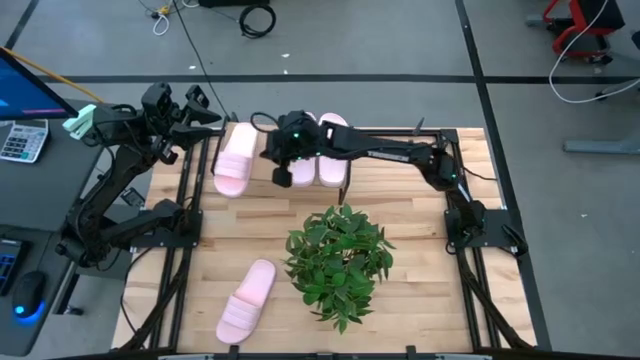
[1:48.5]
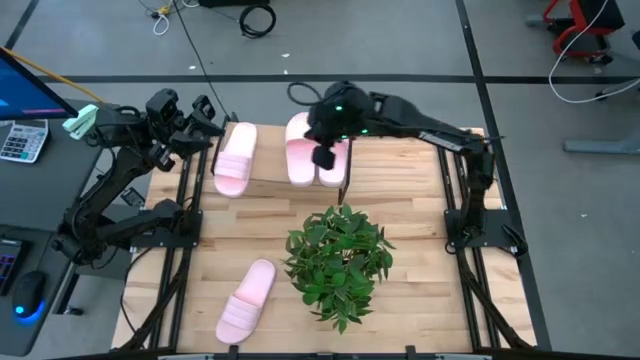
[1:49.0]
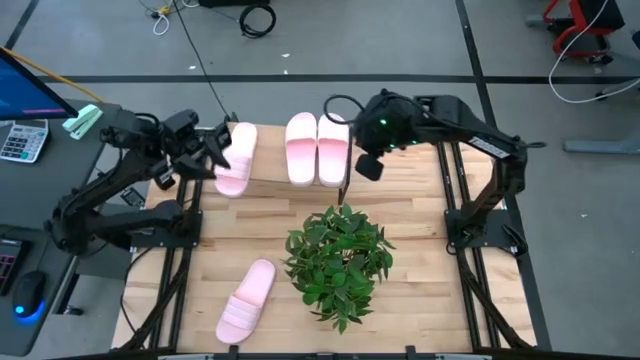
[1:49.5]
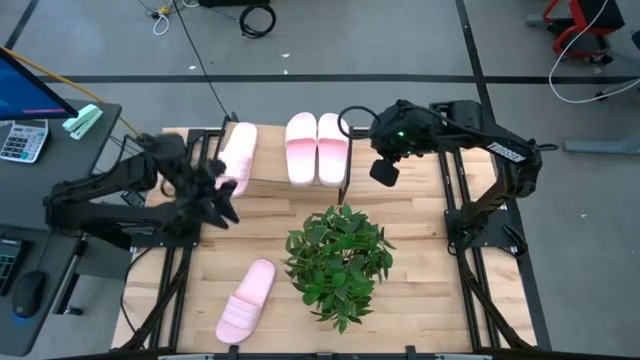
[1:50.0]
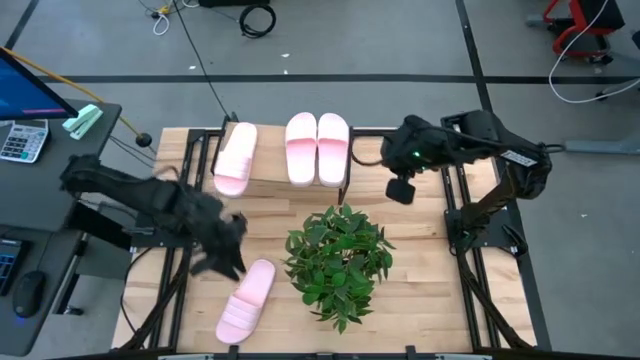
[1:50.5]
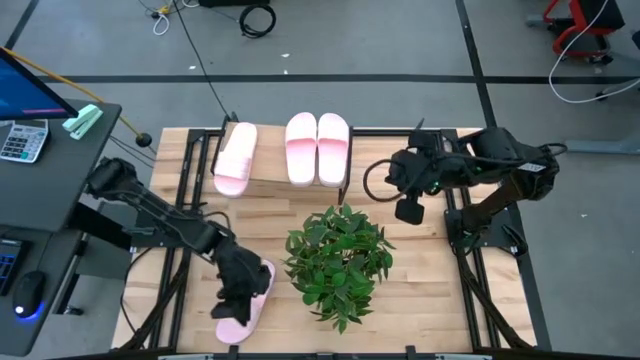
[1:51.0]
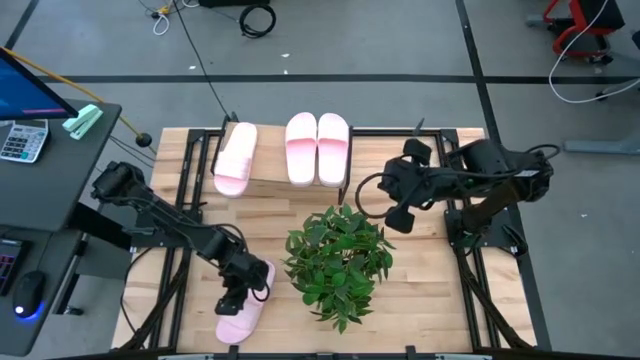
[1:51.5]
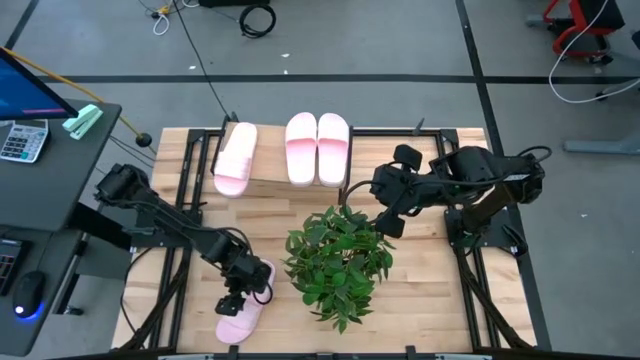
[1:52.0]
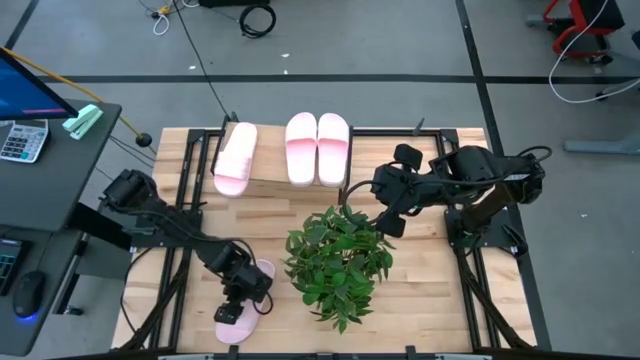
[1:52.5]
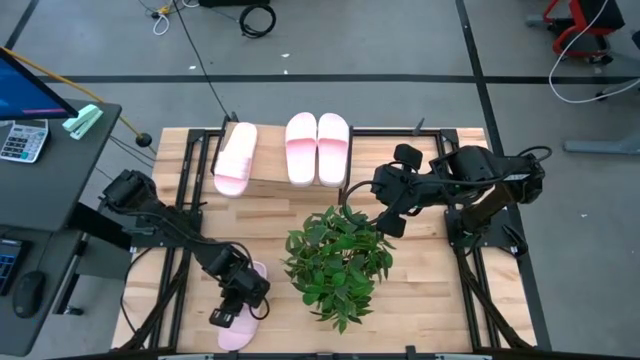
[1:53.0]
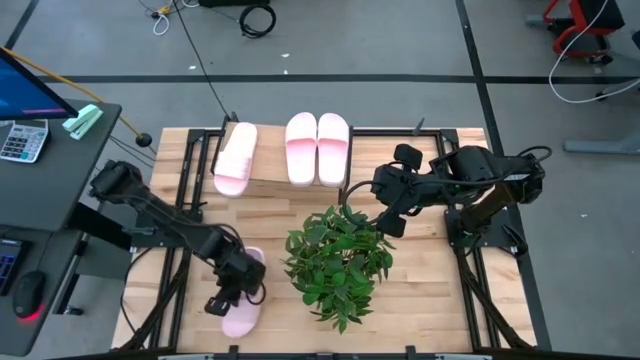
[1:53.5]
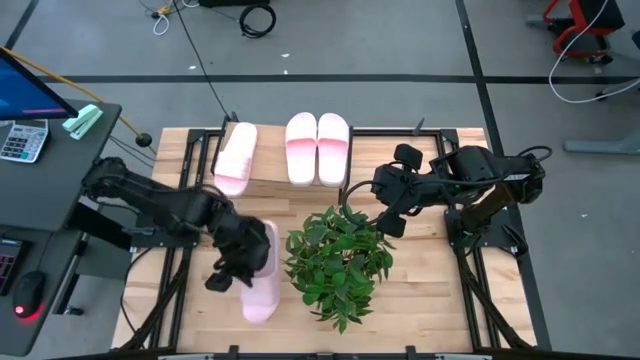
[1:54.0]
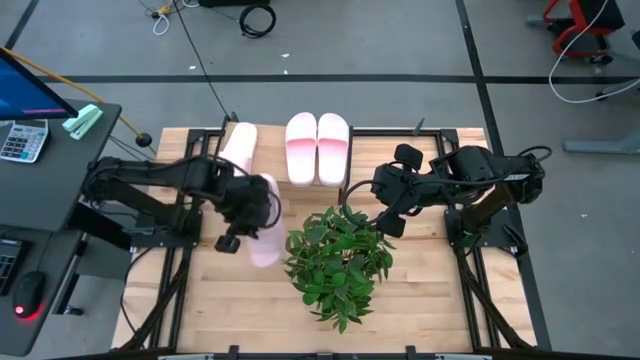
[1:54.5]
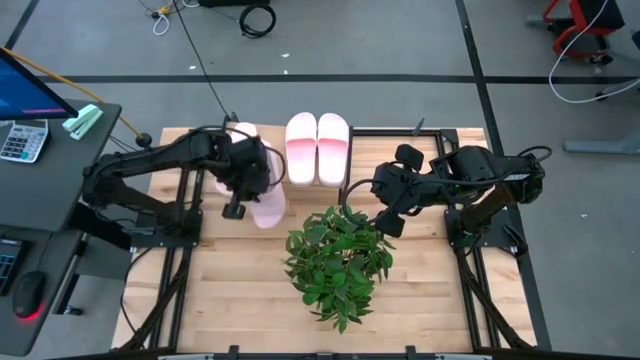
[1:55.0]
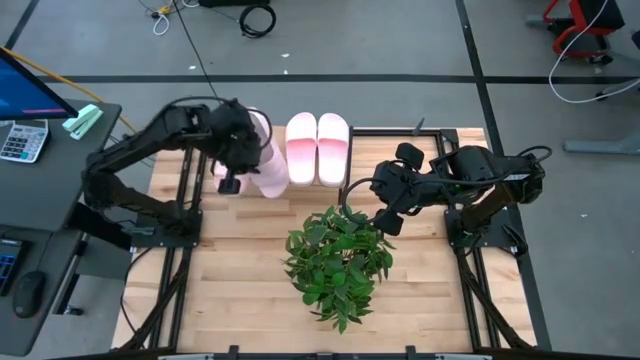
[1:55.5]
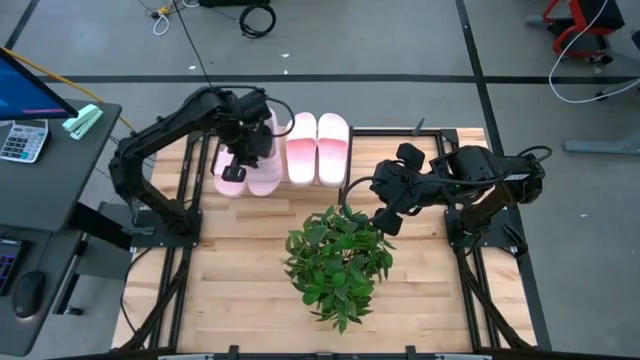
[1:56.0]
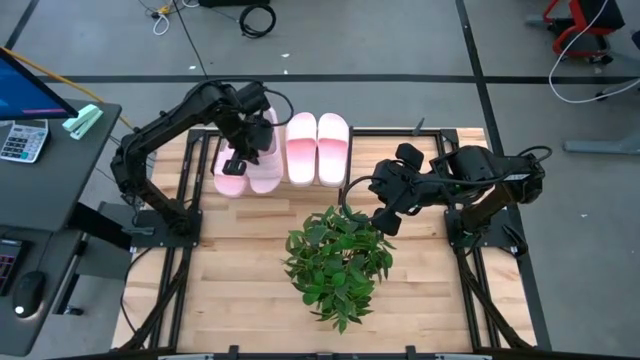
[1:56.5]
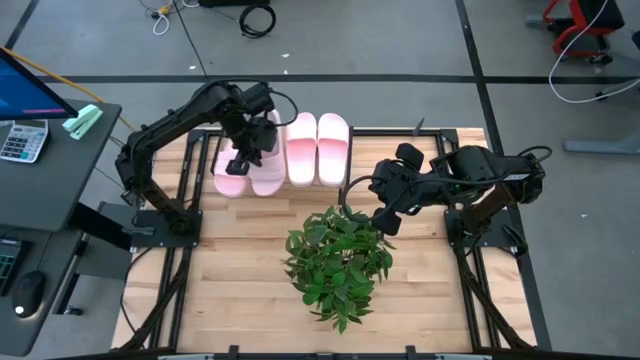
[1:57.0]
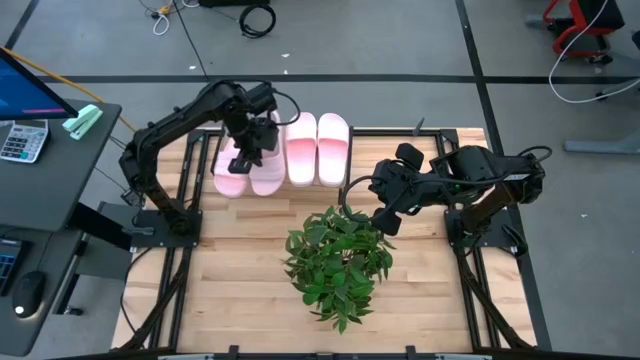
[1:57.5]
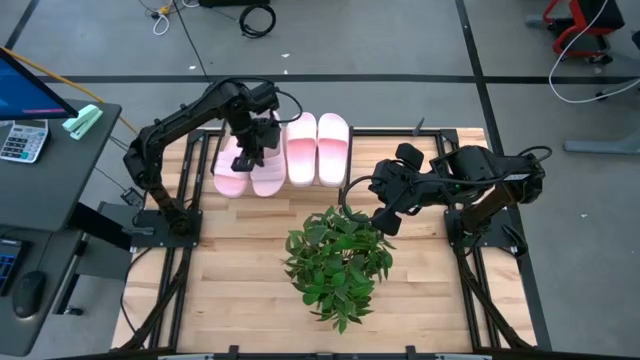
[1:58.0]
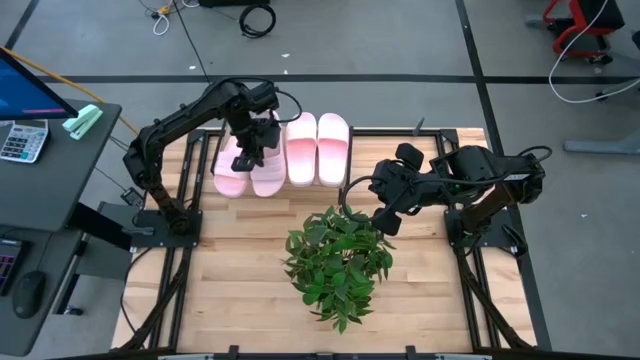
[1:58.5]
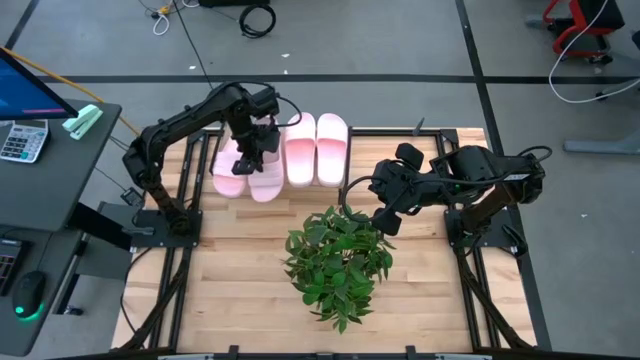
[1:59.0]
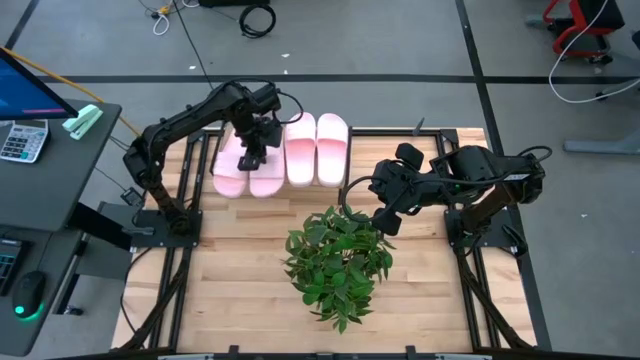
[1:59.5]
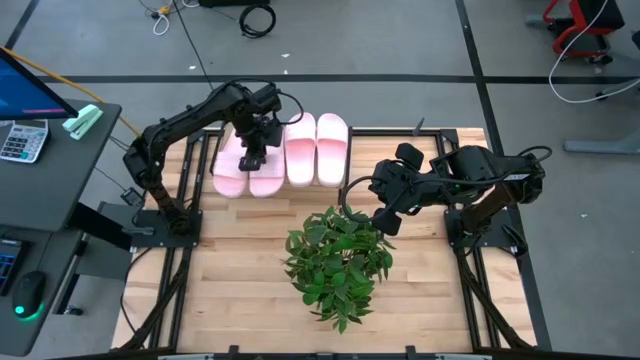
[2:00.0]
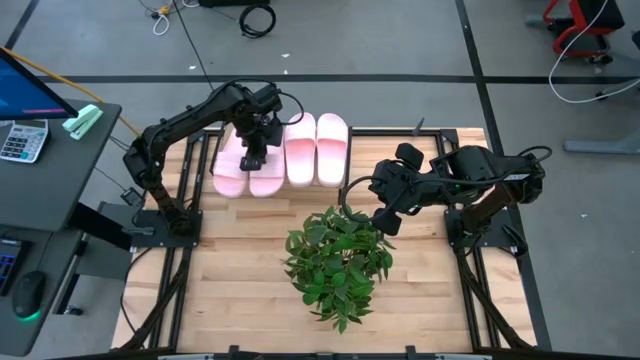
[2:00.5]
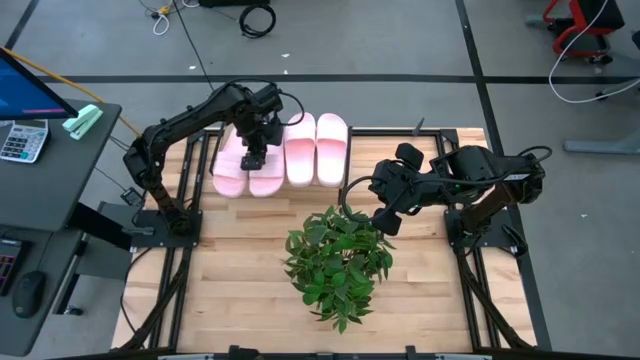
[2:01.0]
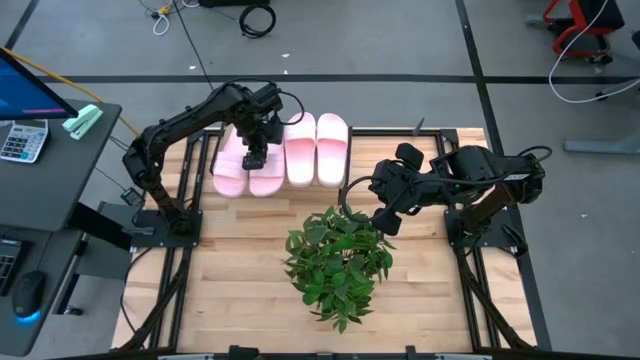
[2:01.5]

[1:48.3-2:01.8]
Task: Pick and place slides into the shelf
Put the pink slide on the shelf

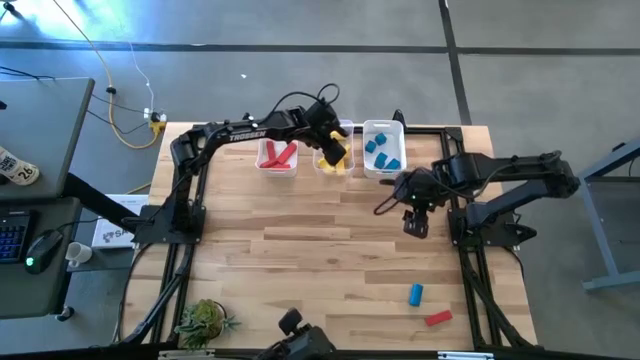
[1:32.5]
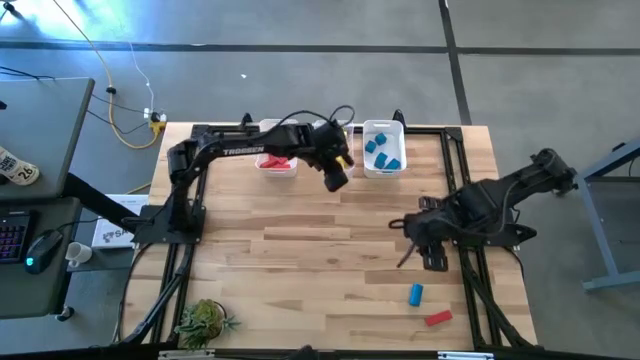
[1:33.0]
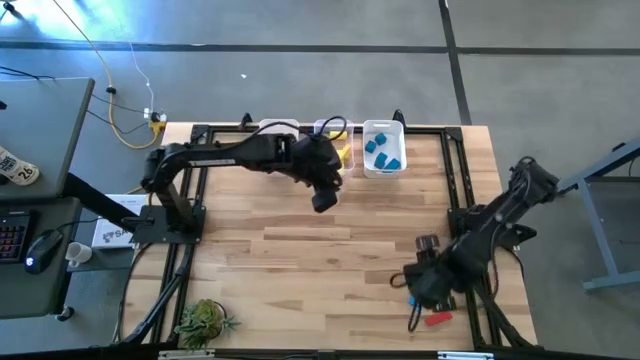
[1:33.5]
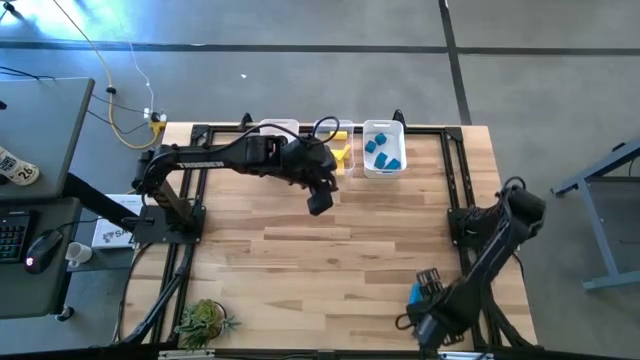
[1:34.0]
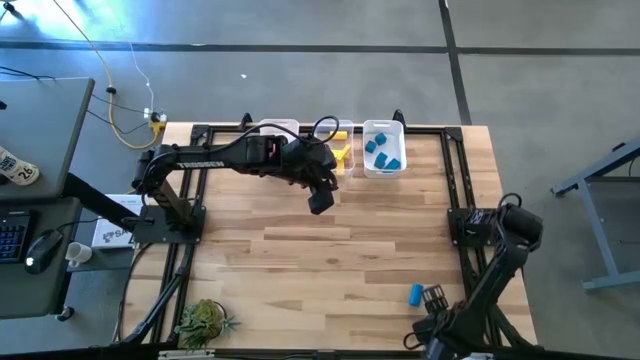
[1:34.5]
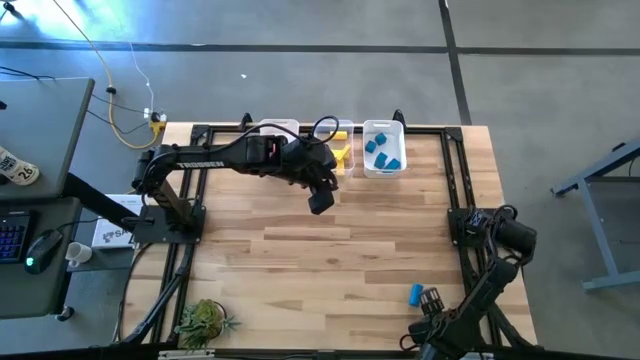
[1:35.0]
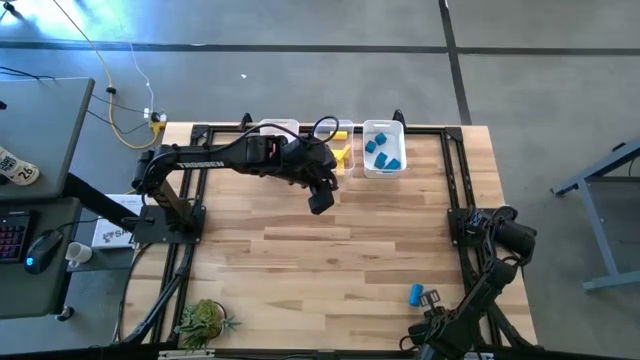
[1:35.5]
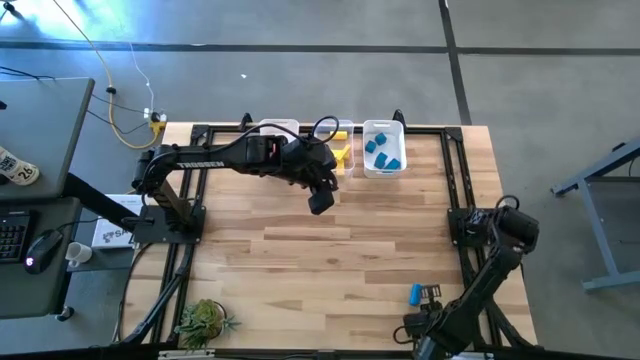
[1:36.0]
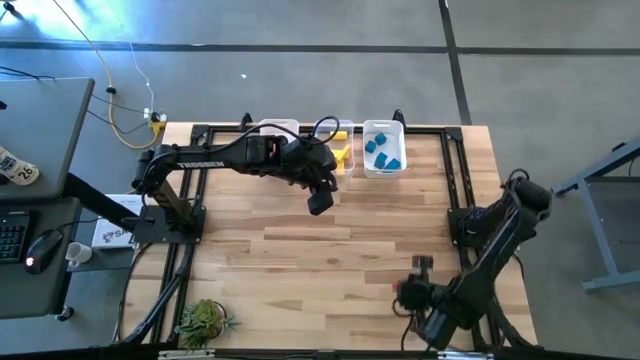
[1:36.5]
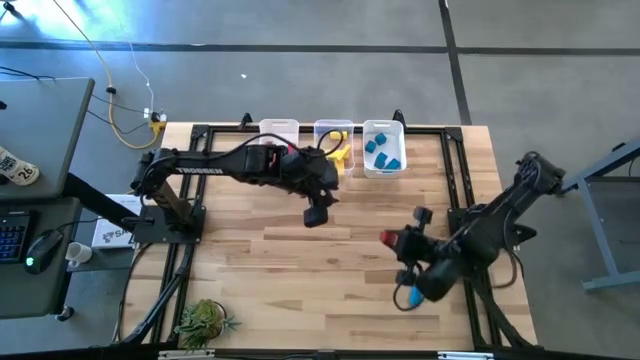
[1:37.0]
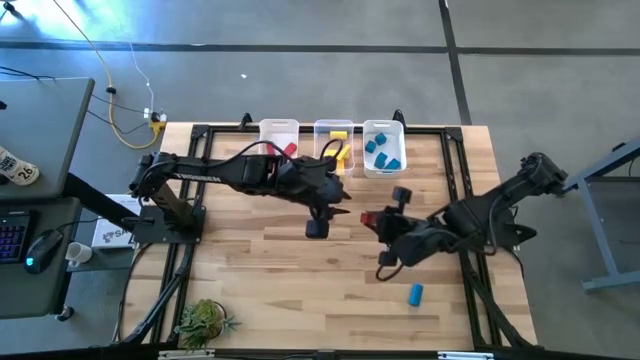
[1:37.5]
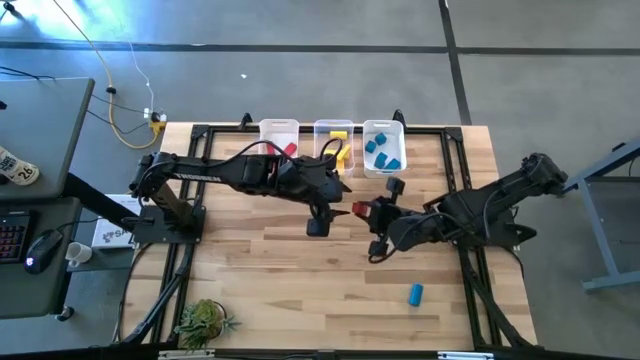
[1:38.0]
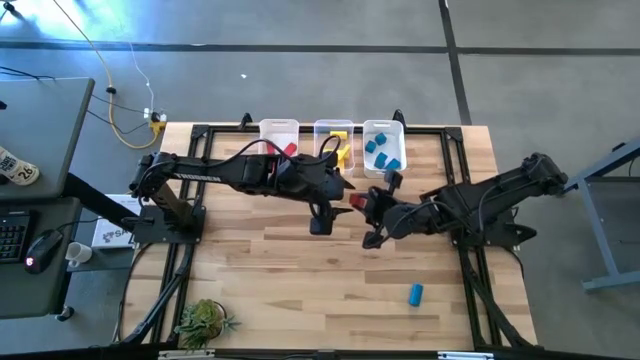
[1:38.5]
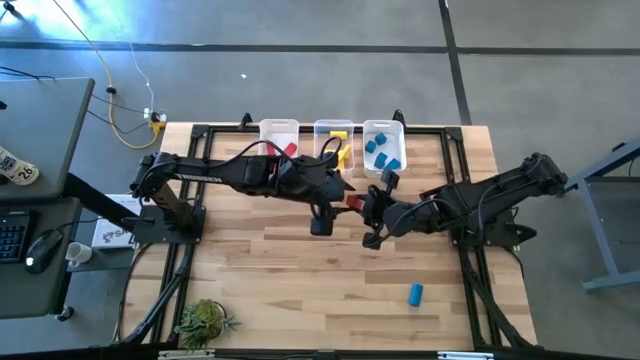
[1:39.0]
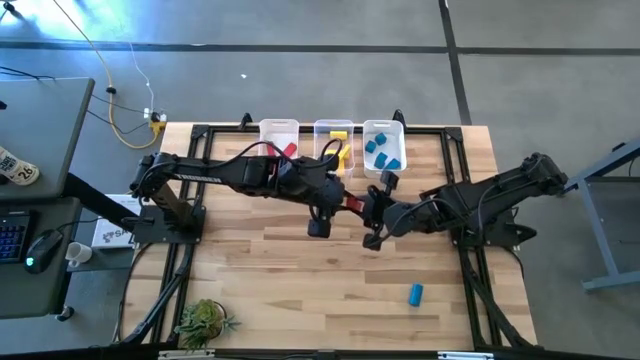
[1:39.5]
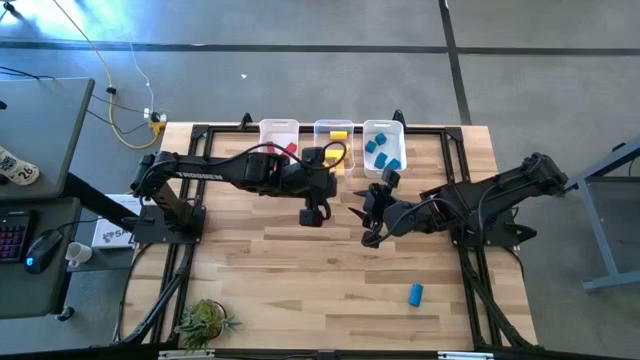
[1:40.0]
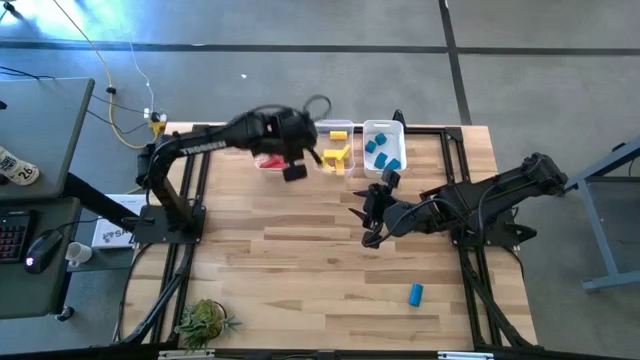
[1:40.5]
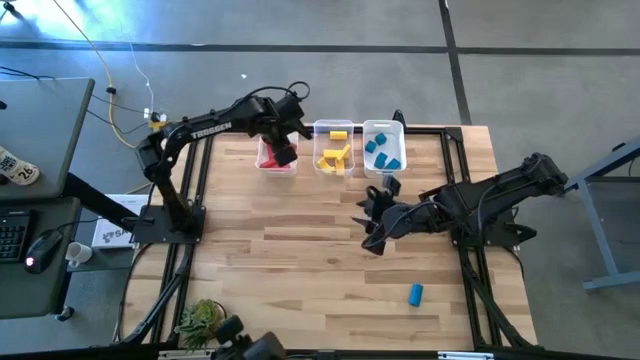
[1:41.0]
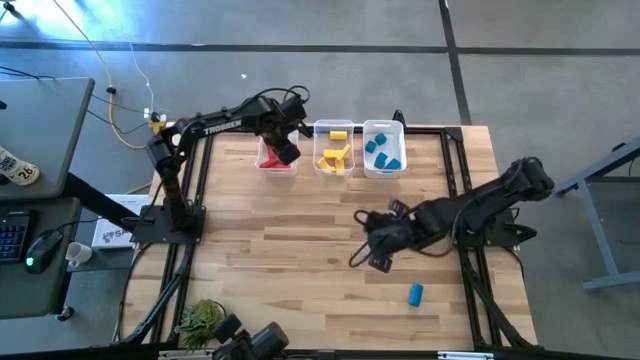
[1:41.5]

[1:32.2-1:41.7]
Task: Sort & place blocks by color
Put the red block into the white bin
